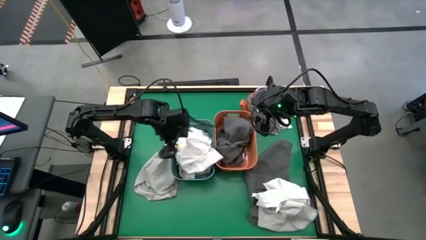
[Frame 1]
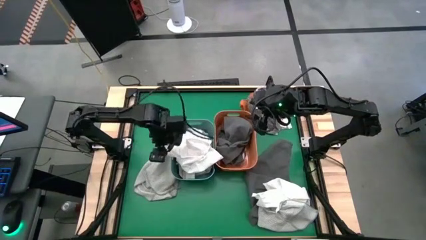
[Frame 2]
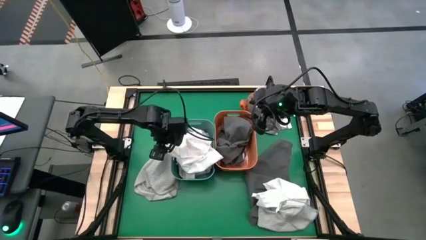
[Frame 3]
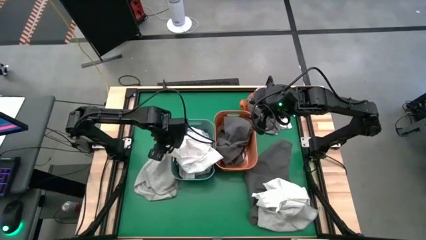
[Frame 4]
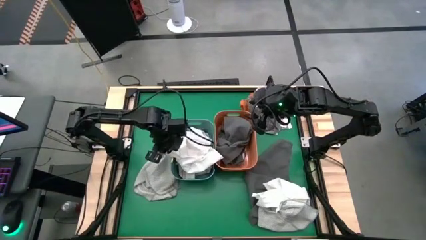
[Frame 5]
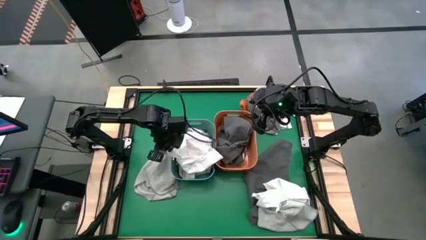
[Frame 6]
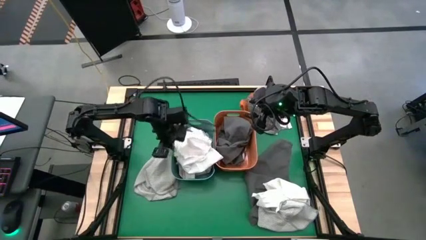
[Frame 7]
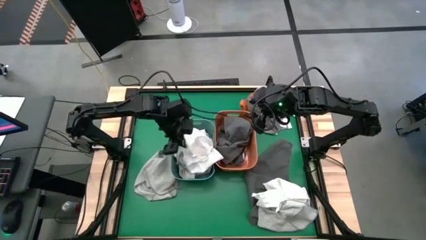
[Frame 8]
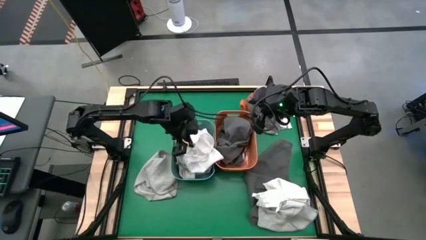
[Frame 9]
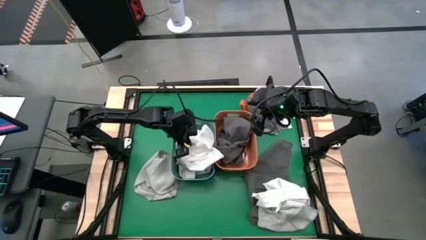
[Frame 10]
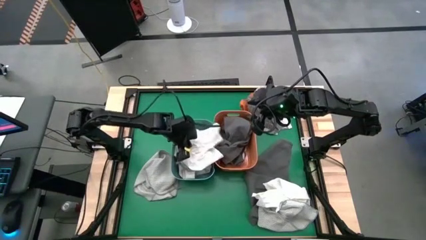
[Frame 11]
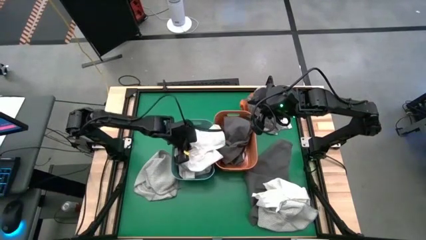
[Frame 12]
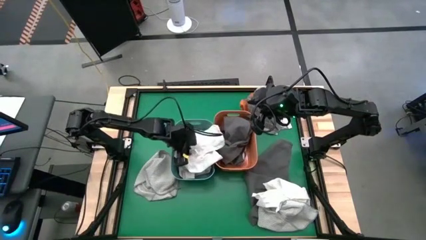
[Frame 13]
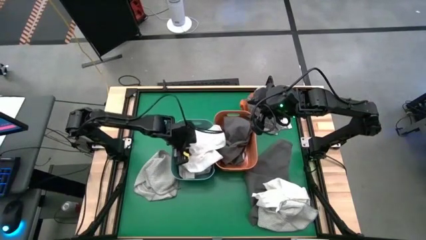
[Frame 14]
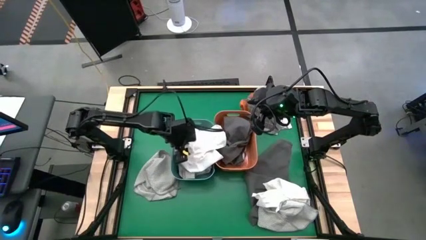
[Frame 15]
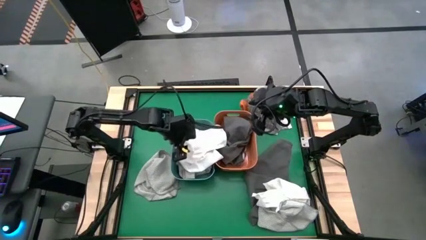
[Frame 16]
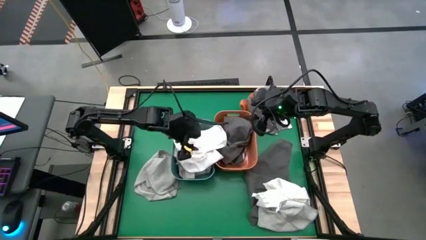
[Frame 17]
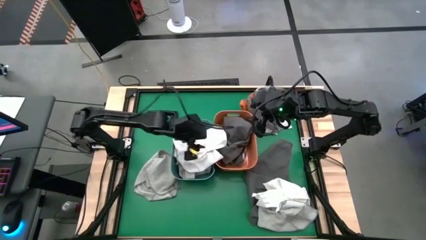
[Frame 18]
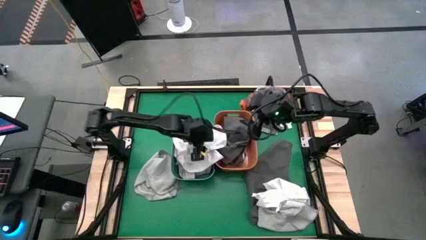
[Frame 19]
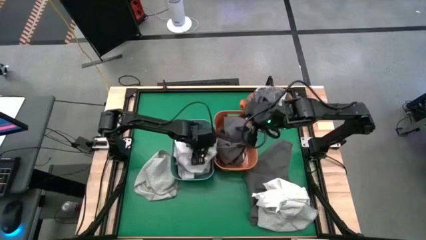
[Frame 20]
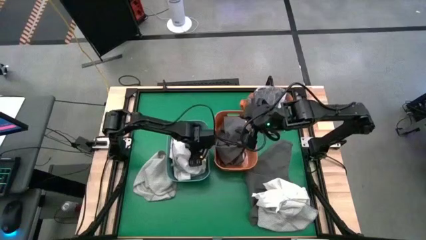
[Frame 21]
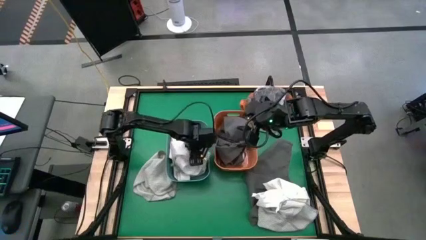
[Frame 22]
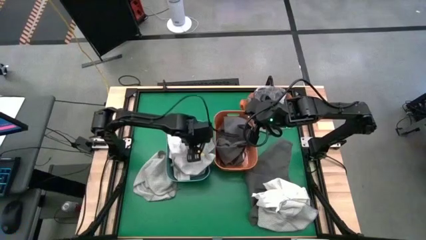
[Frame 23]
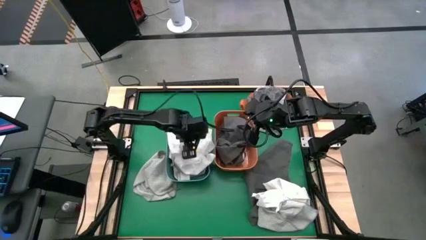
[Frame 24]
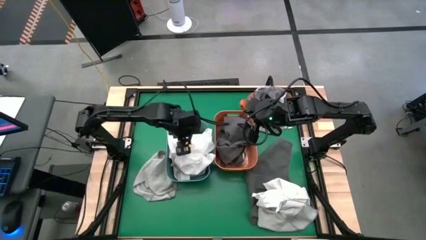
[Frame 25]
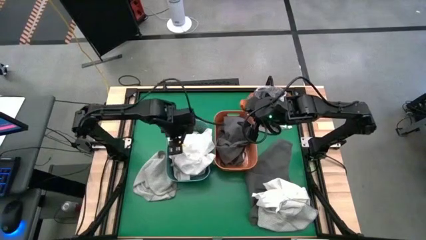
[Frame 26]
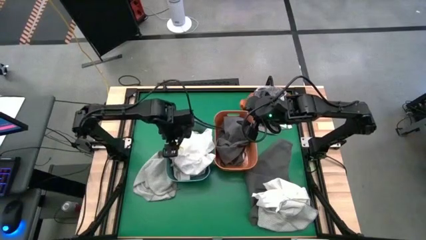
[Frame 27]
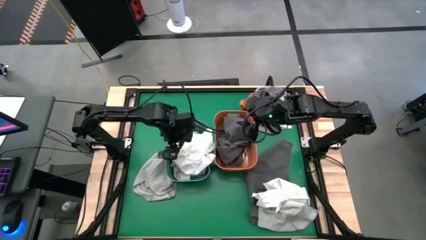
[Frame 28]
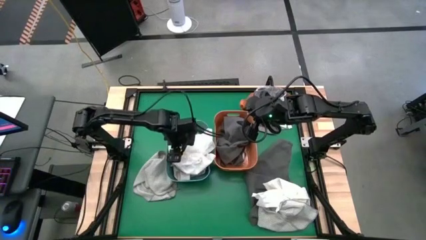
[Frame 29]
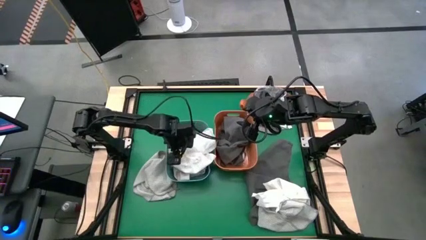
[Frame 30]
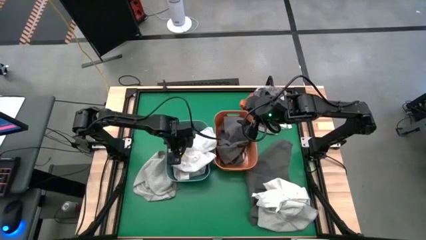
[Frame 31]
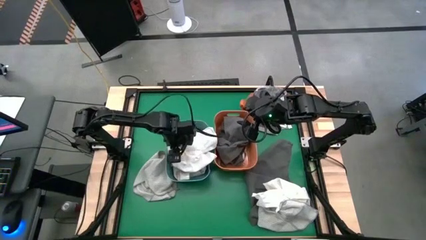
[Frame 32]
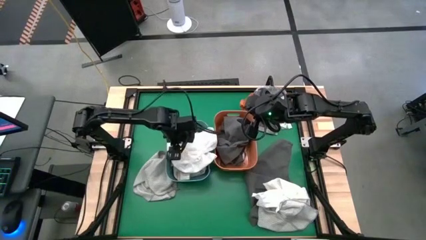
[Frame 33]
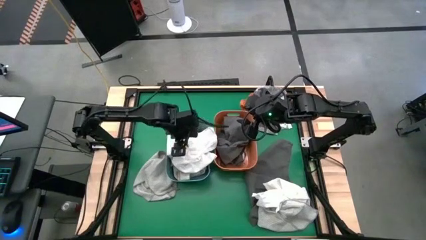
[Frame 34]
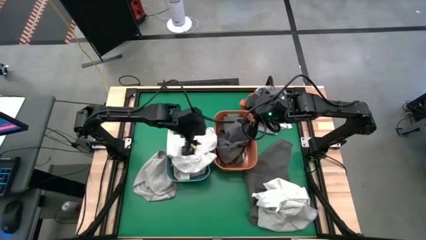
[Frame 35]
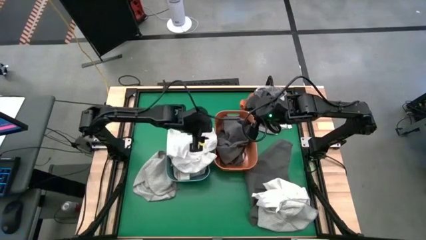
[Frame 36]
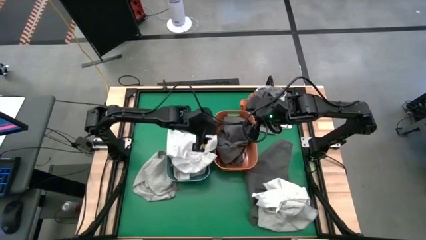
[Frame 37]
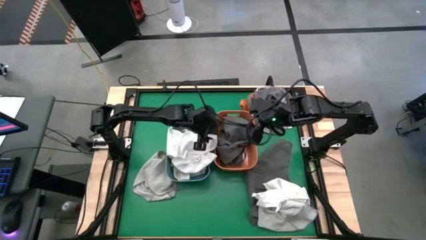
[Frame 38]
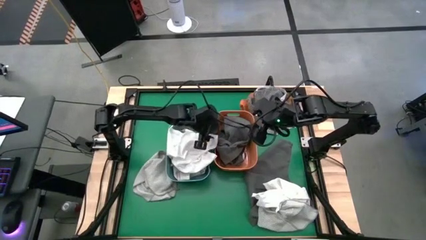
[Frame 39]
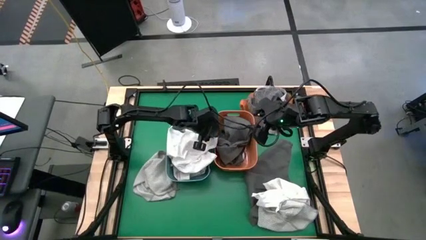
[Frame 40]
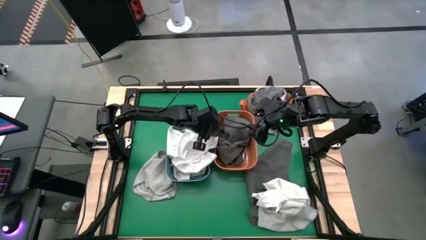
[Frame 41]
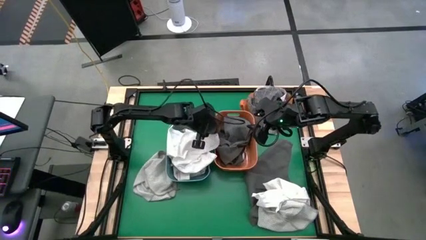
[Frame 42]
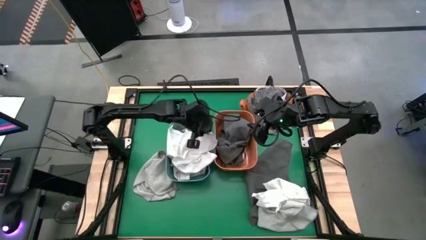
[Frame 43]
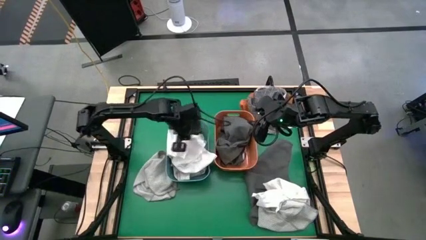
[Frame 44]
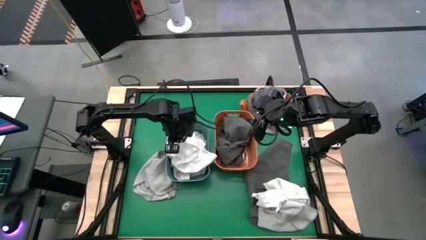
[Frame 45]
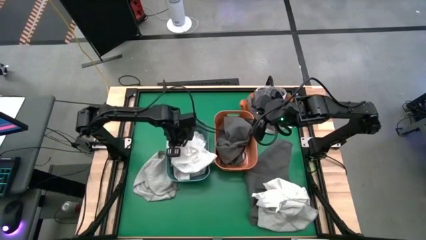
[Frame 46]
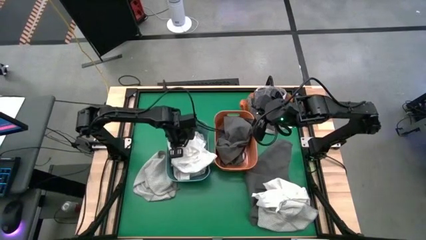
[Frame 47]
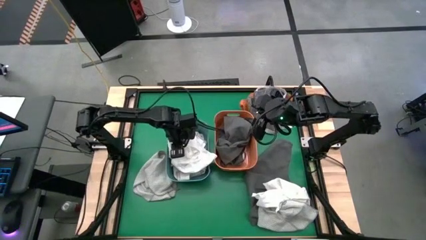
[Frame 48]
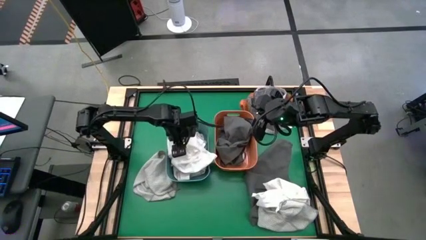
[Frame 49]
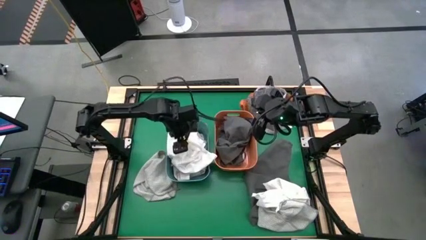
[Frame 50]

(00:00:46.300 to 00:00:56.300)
Task: Sort towels by color in basket
Put the white towel into the green bin

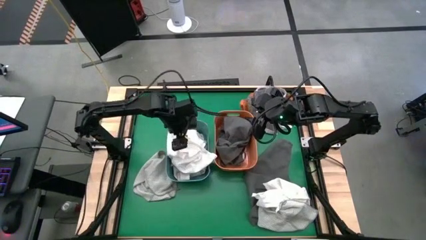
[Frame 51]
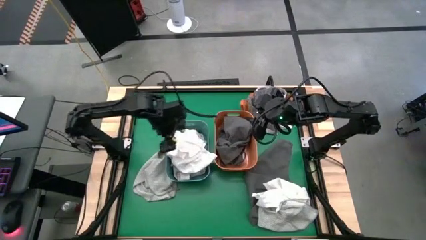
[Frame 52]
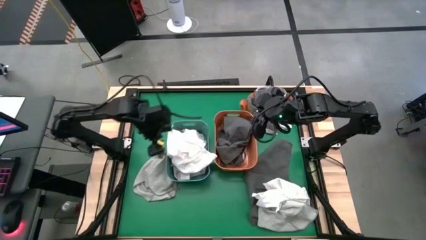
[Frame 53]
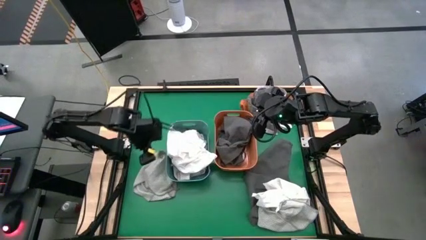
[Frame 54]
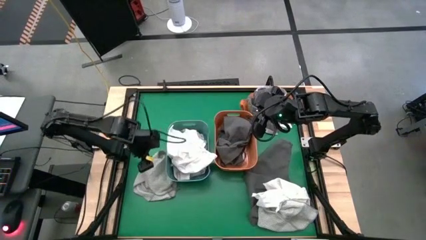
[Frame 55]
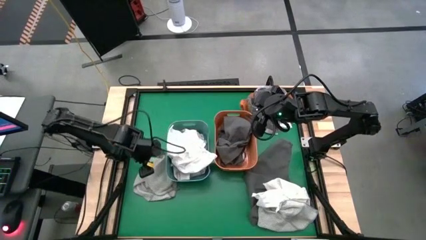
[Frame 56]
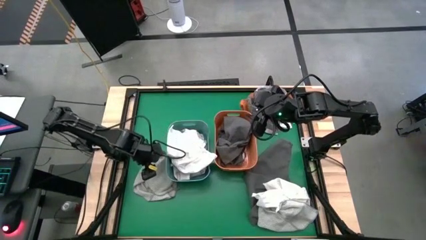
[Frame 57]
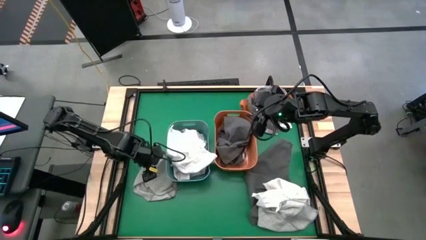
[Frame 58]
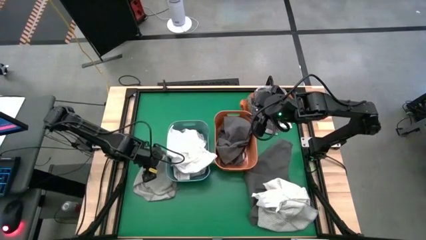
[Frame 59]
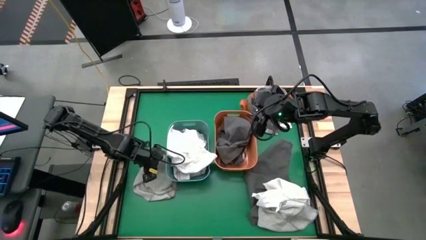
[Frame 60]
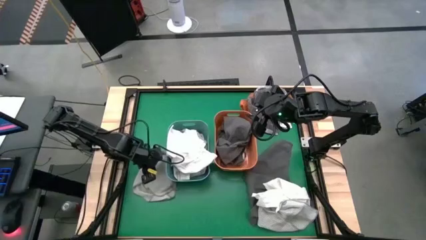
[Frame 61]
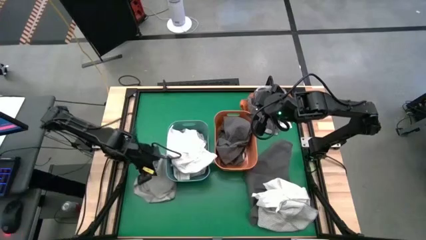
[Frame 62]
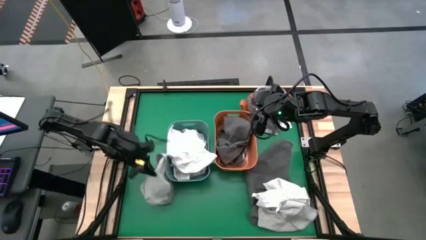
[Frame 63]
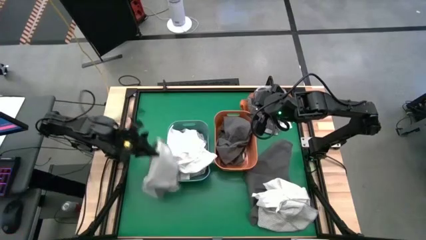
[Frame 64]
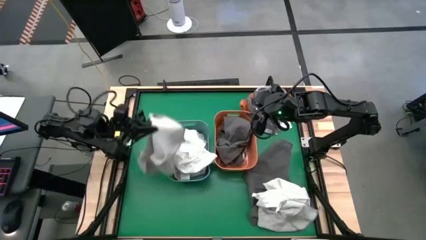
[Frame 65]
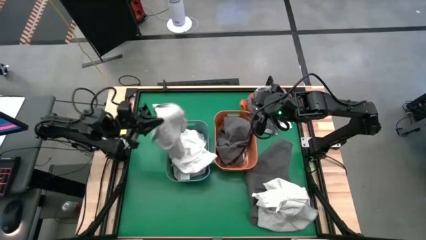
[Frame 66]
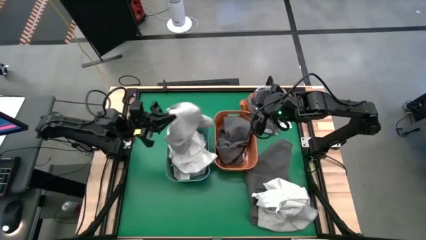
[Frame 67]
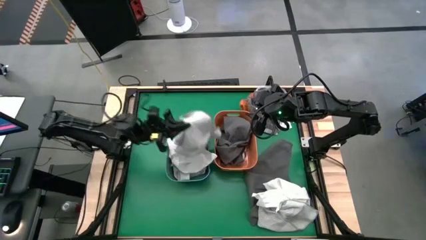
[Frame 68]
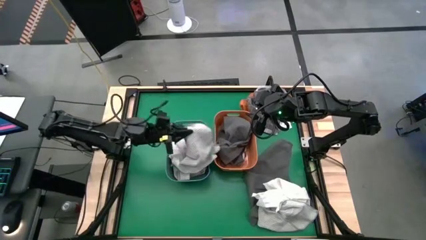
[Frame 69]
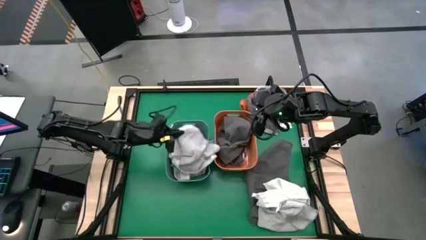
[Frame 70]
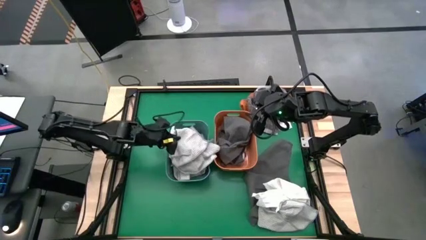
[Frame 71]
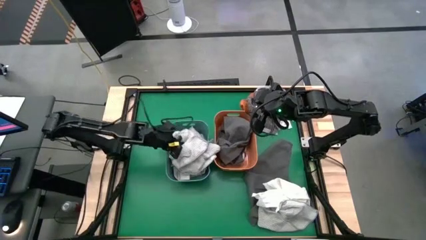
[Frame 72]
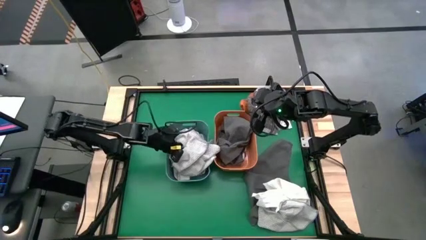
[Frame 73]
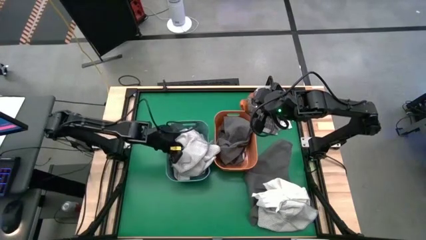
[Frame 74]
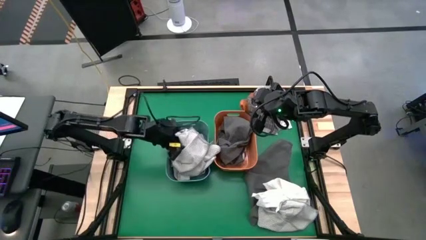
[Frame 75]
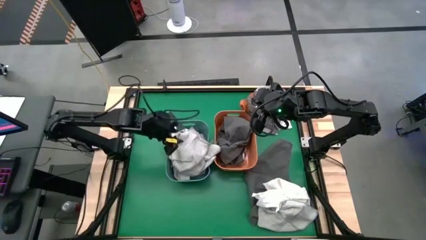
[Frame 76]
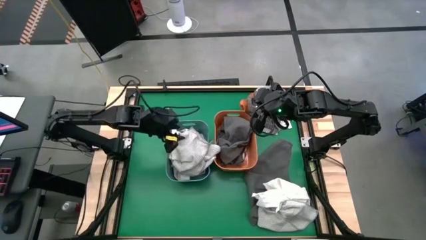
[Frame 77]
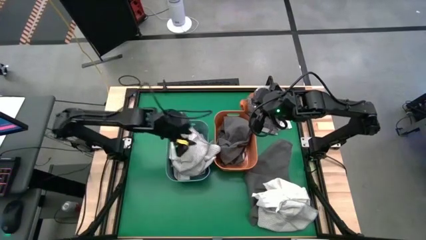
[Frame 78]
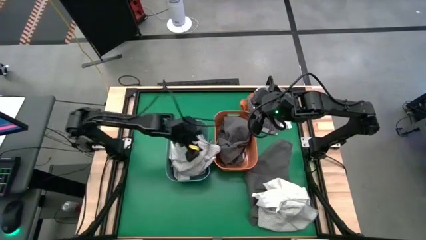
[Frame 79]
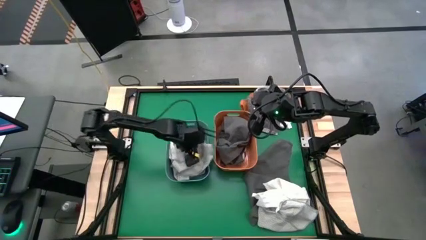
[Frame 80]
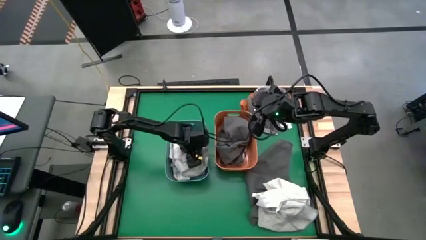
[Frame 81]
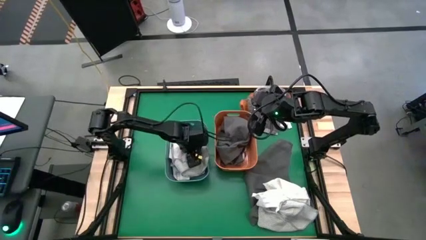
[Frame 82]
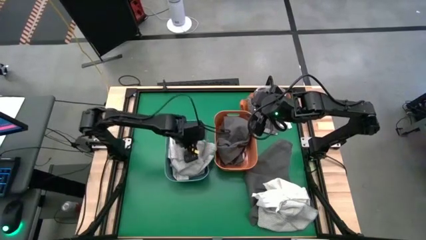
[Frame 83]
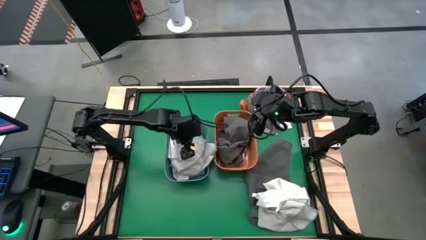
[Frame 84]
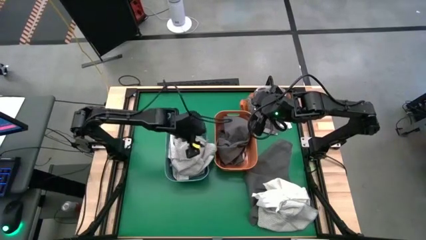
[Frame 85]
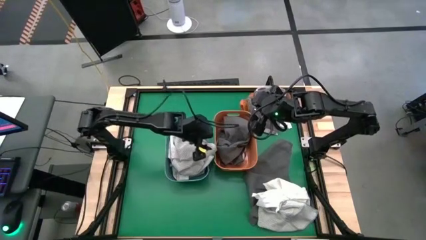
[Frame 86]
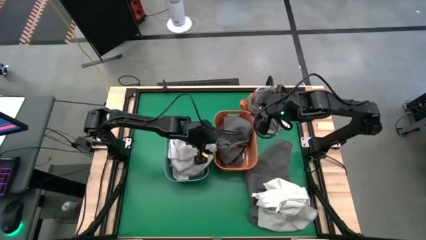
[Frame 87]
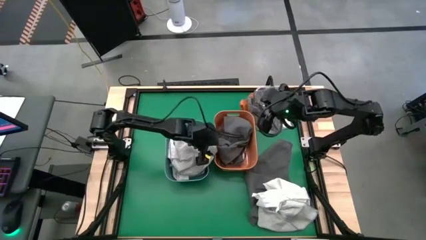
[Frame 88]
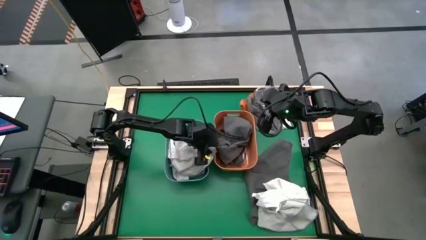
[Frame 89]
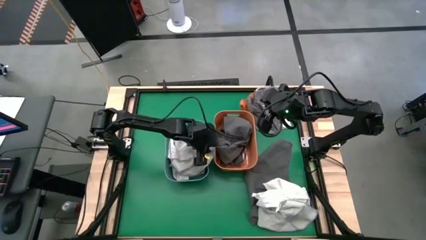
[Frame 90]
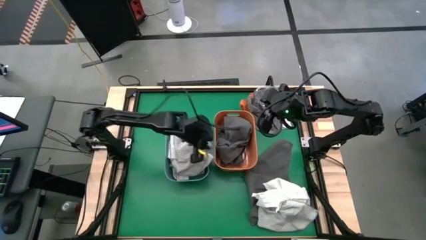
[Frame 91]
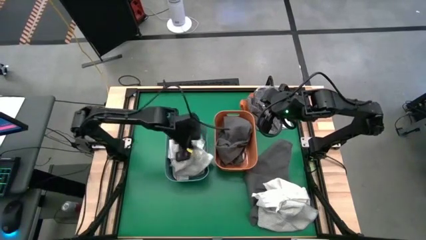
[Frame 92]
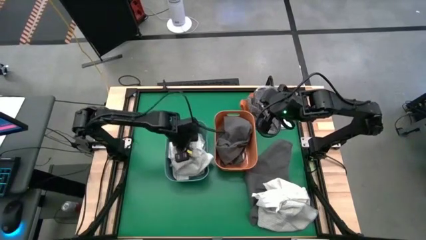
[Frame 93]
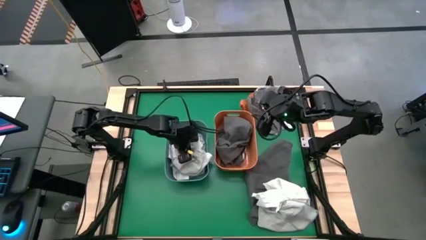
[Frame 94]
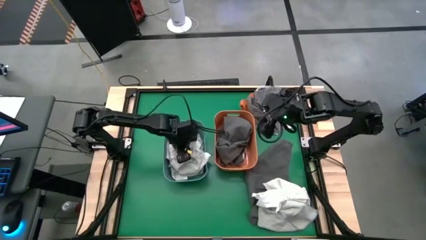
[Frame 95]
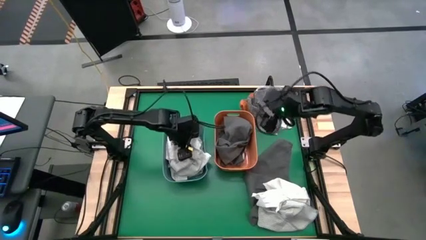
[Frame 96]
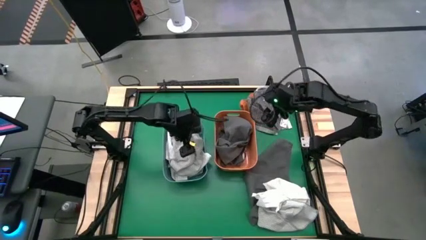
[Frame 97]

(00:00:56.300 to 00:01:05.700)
Put the left gray towel into the green bin
